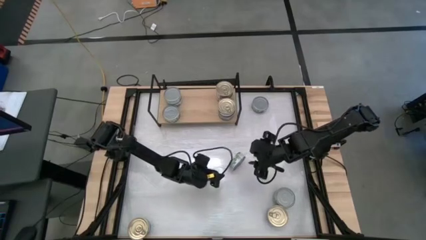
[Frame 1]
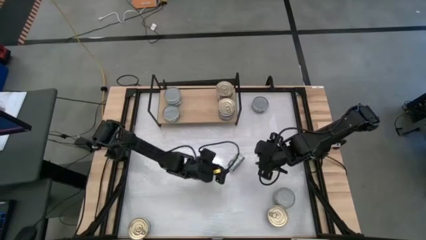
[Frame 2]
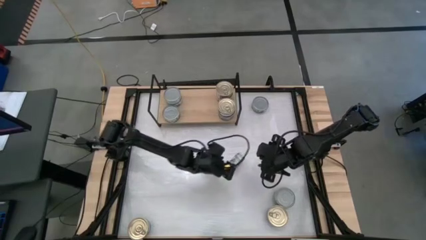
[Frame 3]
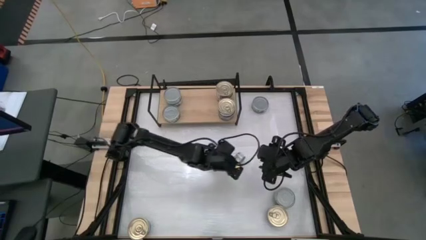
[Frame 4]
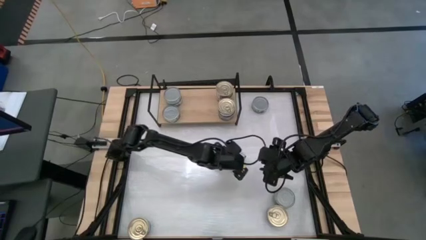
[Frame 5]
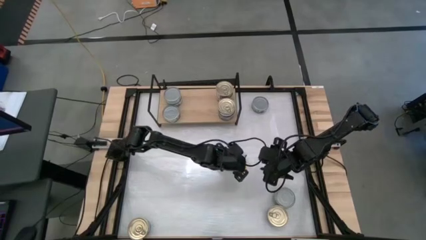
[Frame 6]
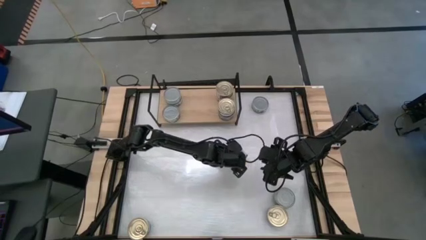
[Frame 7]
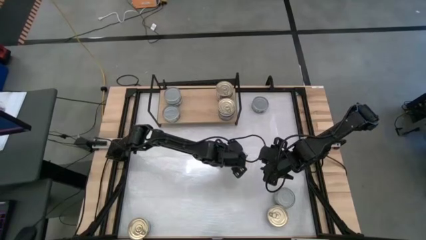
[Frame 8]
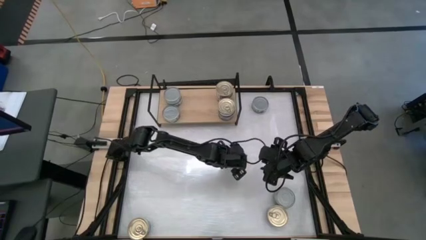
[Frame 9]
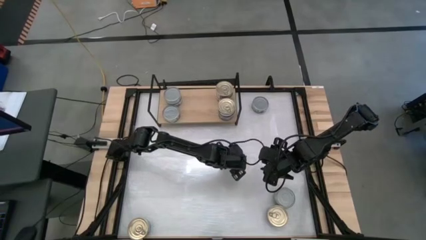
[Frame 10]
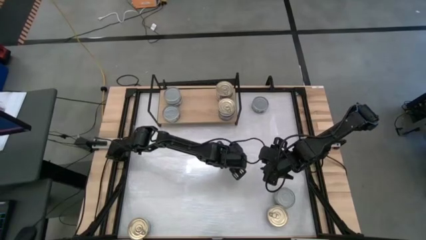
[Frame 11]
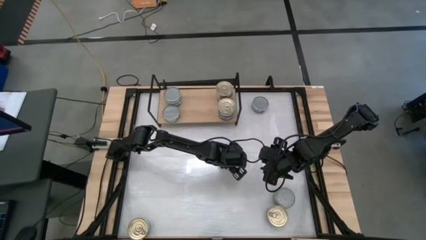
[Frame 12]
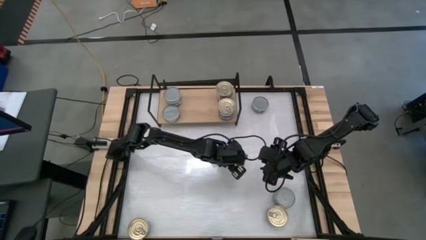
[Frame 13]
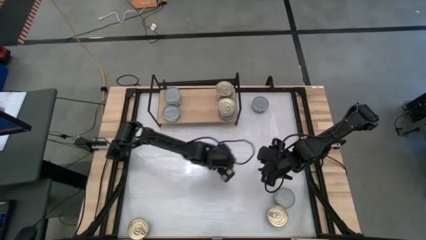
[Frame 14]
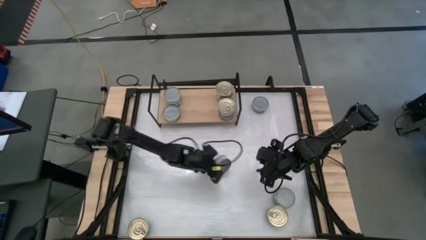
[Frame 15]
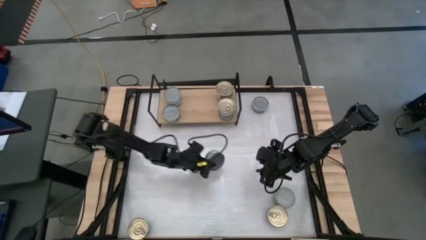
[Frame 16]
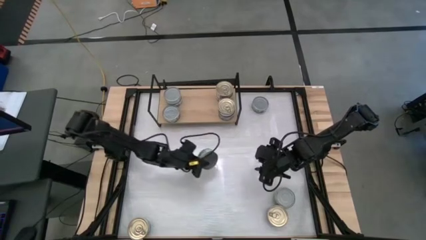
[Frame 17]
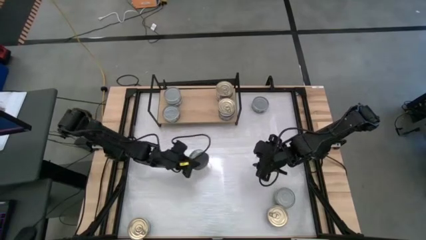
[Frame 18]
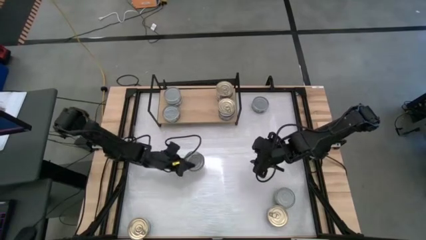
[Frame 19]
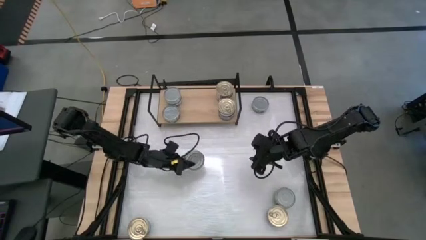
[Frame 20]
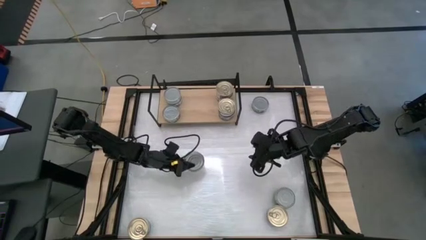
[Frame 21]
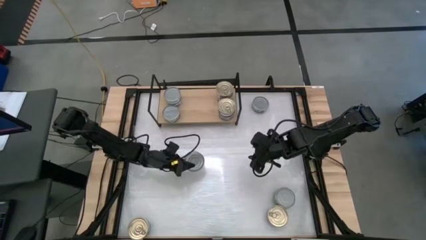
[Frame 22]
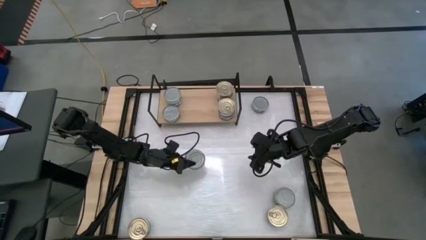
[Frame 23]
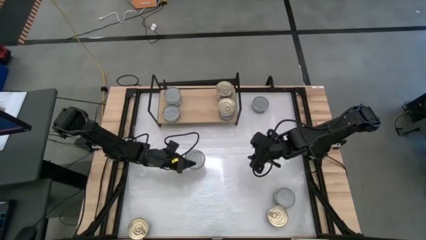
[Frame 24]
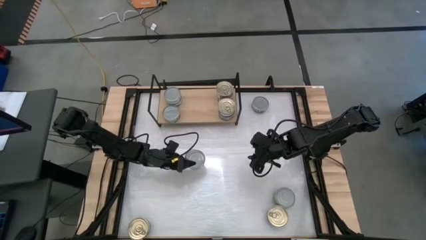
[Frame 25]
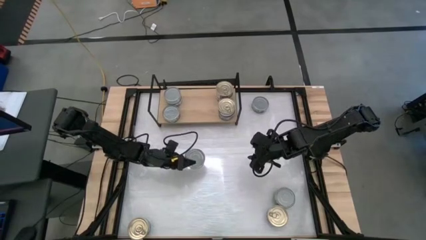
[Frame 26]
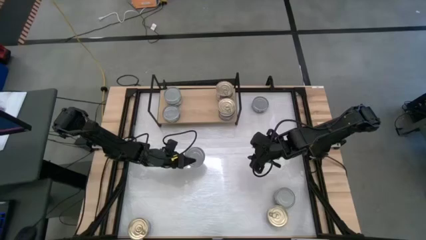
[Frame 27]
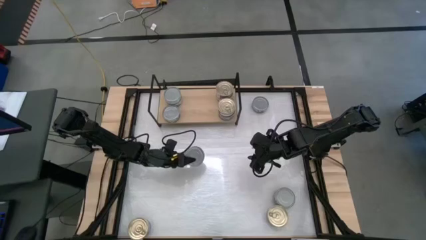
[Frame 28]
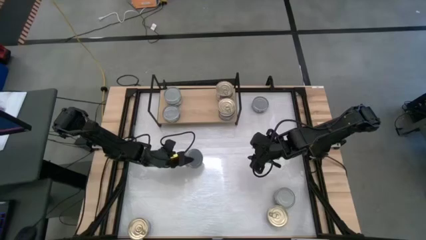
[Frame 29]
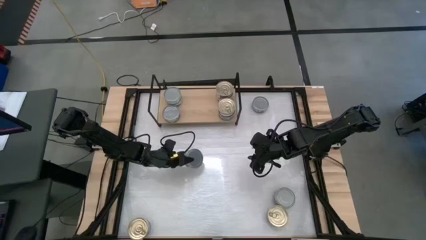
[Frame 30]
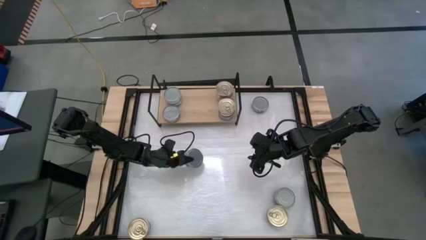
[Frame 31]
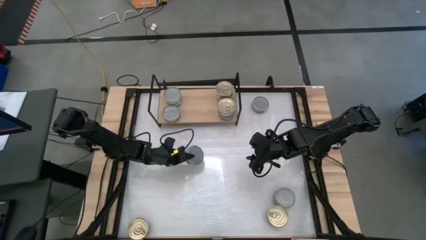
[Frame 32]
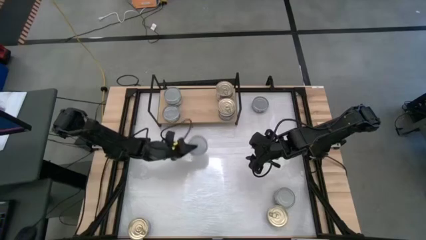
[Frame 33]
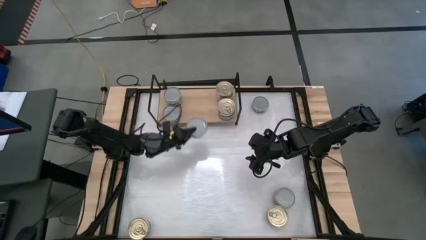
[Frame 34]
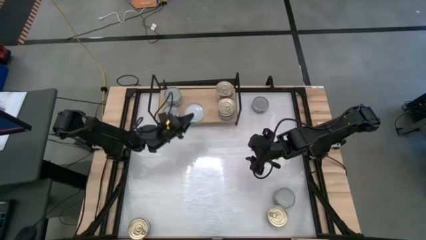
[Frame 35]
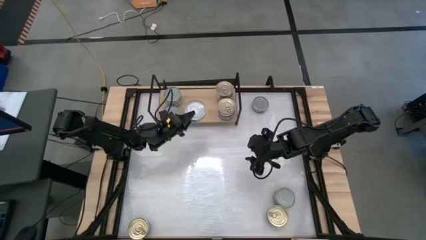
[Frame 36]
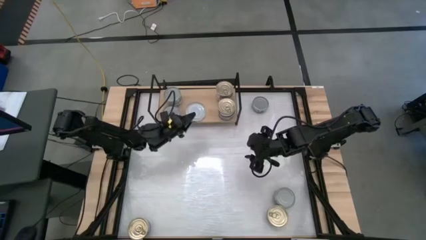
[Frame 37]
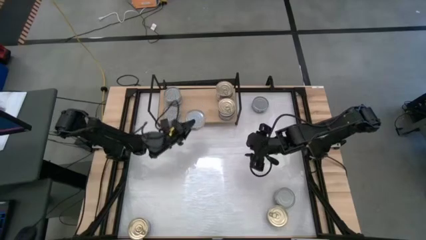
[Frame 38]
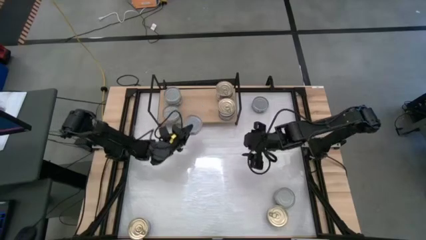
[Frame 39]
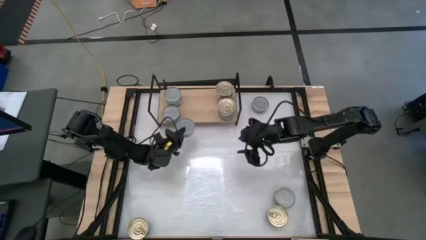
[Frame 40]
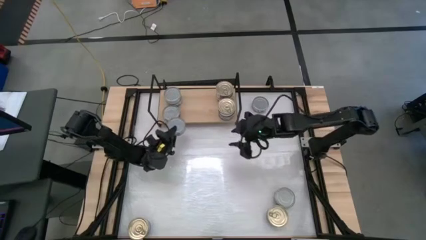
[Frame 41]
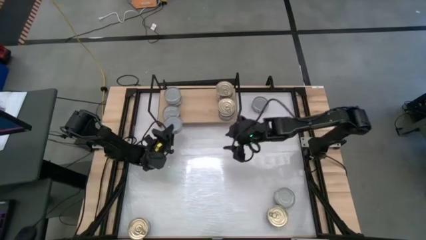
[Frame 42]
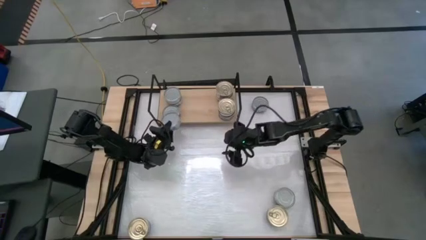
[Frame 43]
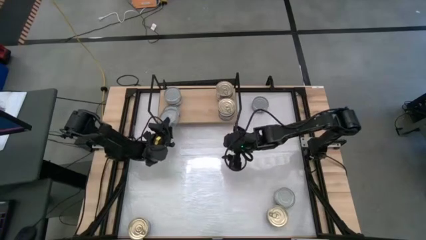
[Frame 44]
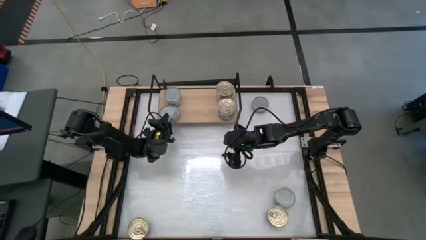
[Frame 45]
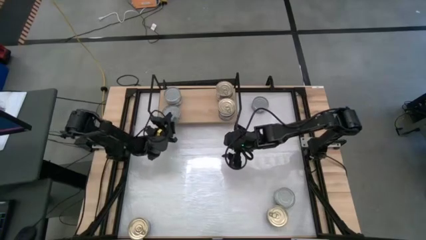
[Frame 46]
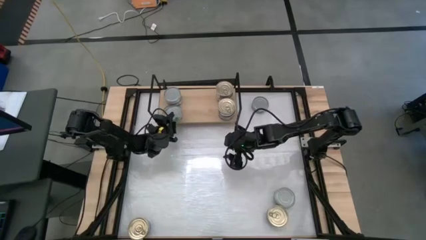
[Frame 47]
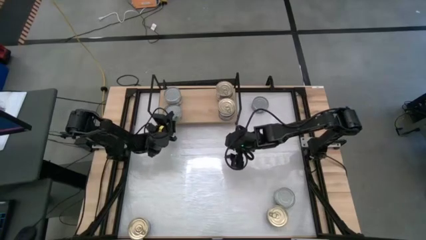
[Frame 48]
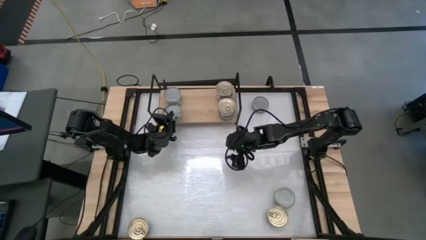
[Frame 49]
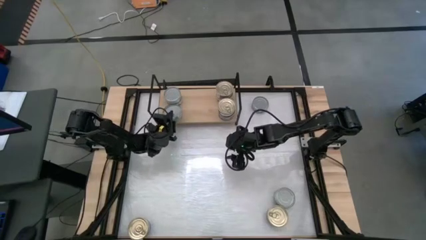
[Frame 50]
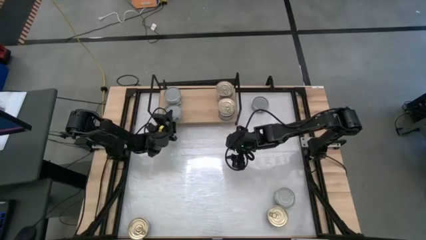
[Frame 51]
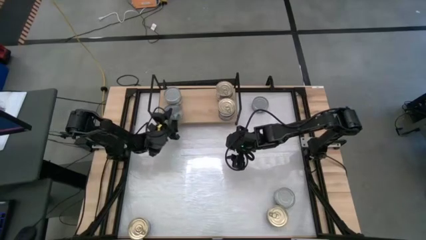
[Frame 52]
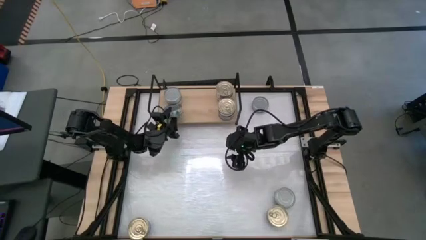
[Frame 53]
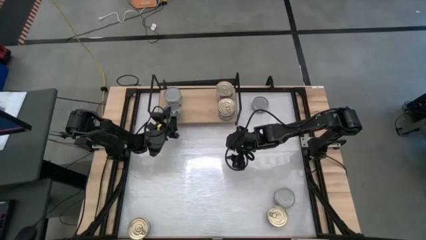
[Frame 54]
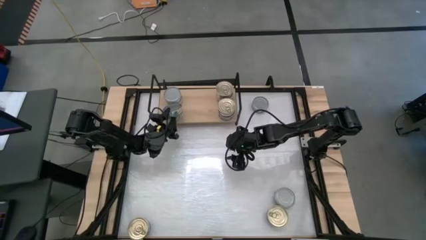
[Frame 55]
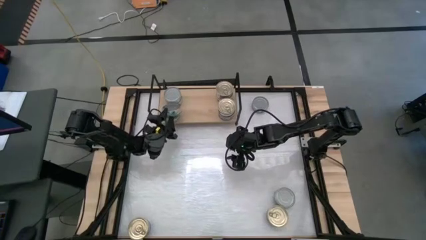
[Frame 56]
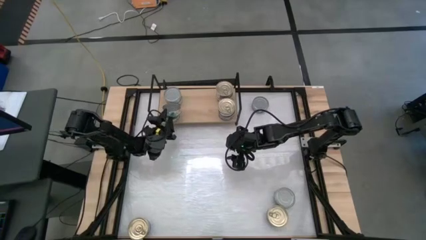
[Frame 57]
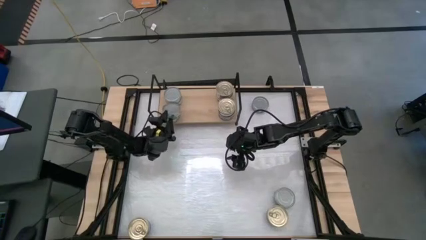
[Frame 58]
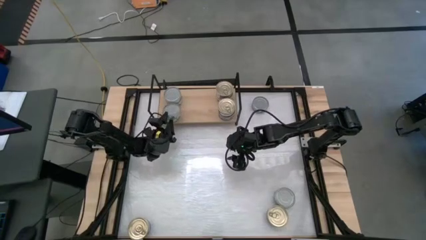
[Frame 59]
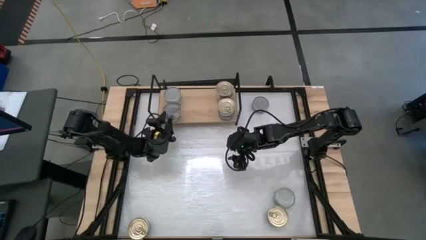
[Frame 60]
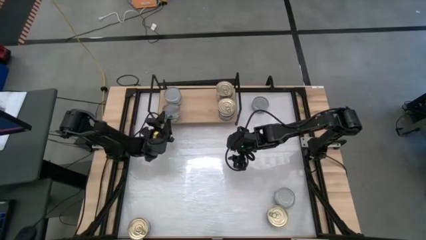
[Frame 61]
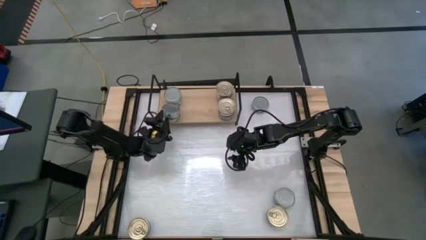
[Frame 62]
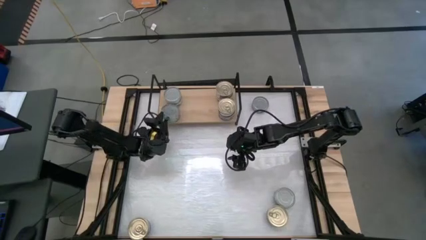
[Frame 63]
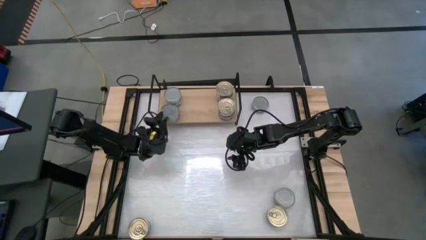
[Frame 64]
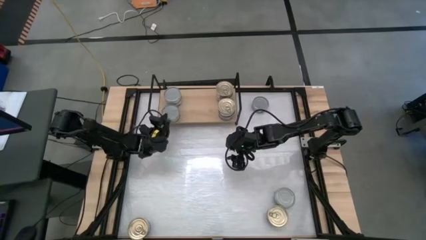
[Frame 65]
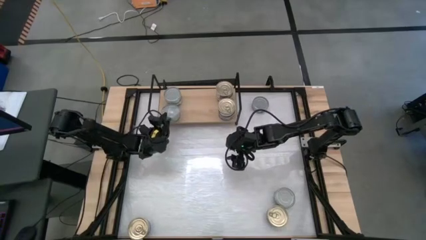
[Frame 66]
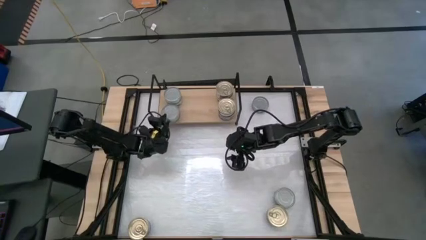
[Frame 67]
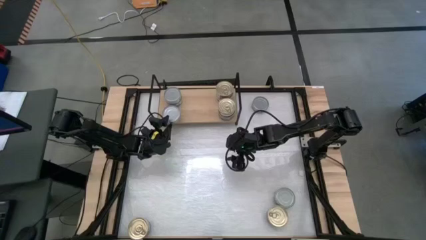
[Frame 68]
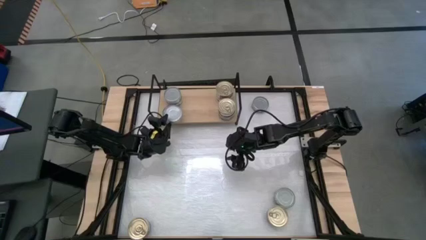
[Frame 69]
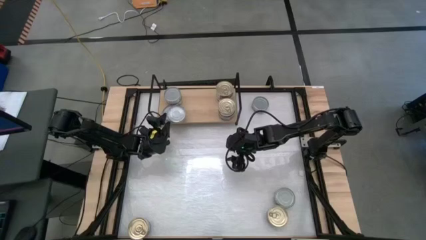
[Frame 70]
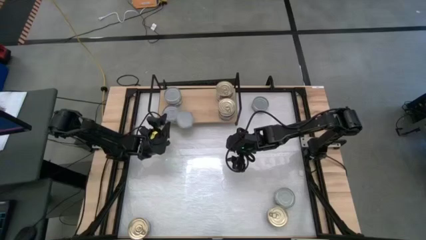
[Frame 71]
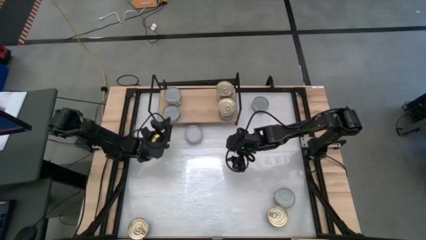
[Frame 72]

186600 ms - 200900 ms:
Task: Stack canned seafood by type on shelf
Stack the green tuna can on top of the green tuna can on the shelf

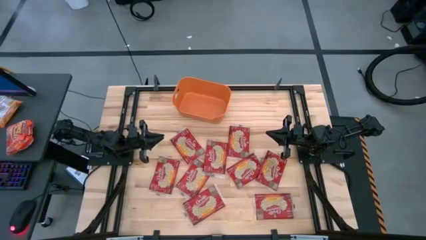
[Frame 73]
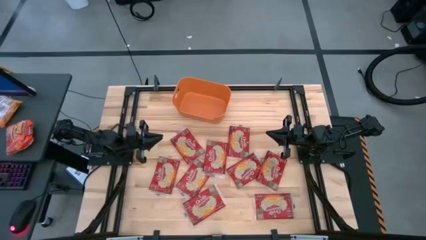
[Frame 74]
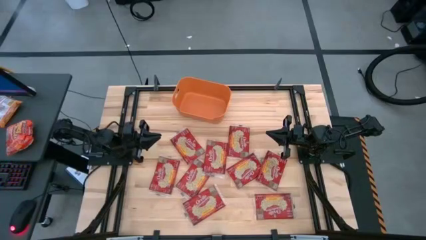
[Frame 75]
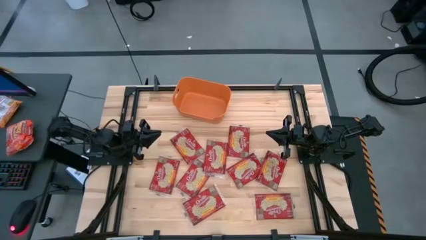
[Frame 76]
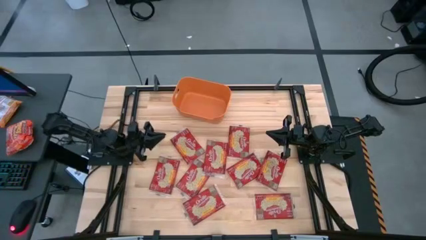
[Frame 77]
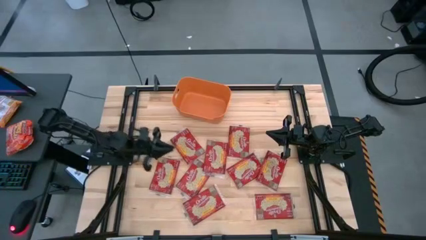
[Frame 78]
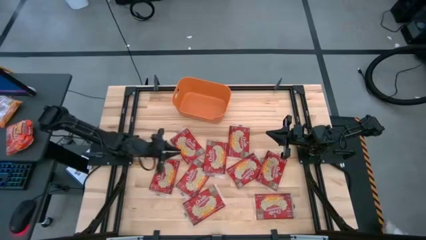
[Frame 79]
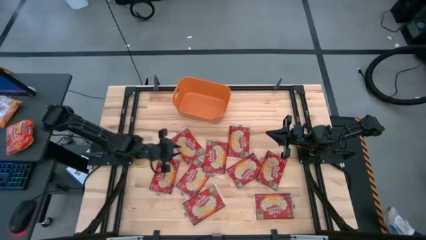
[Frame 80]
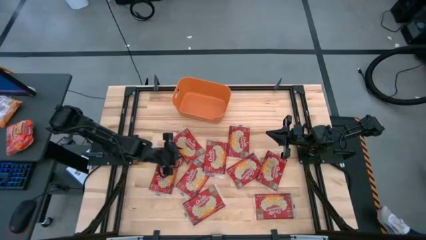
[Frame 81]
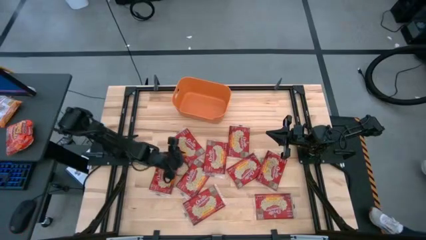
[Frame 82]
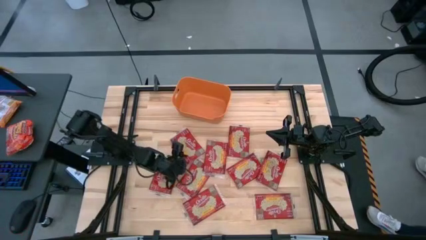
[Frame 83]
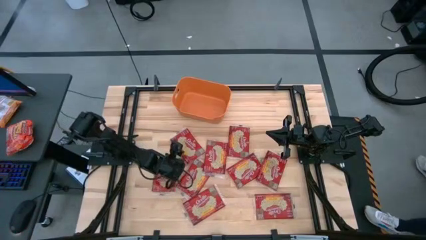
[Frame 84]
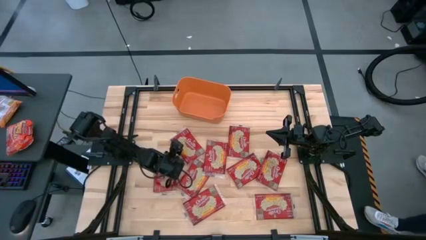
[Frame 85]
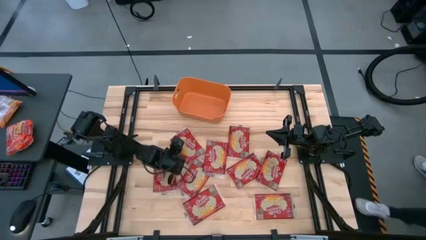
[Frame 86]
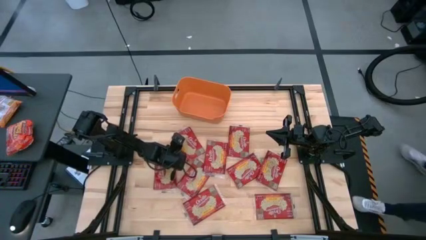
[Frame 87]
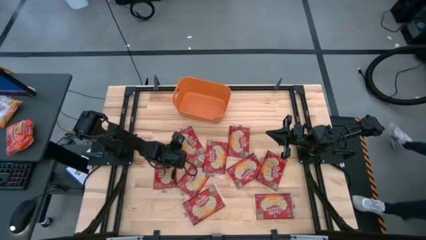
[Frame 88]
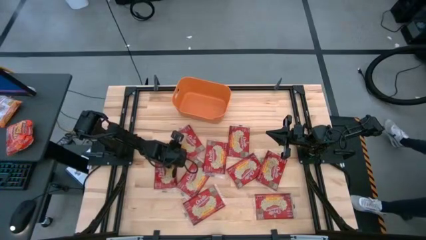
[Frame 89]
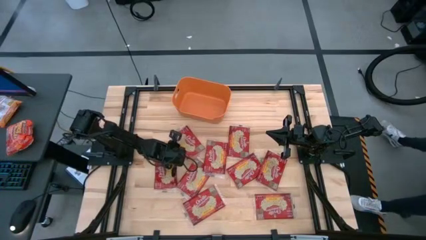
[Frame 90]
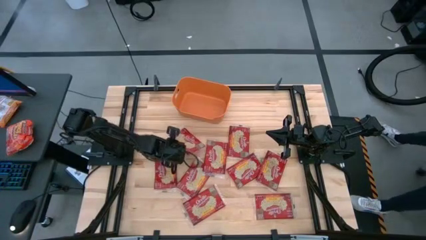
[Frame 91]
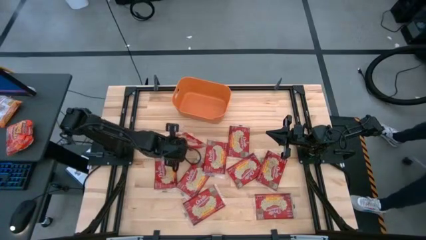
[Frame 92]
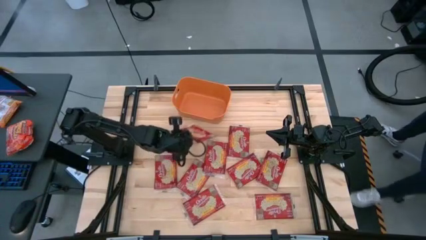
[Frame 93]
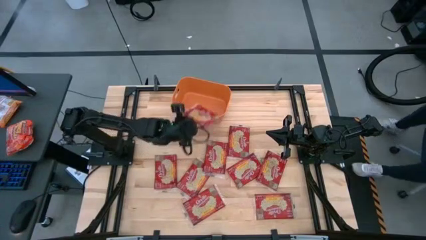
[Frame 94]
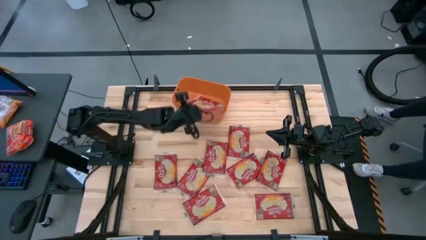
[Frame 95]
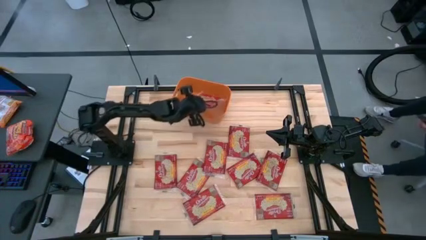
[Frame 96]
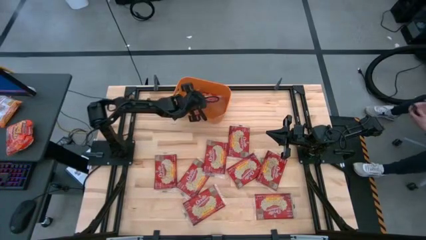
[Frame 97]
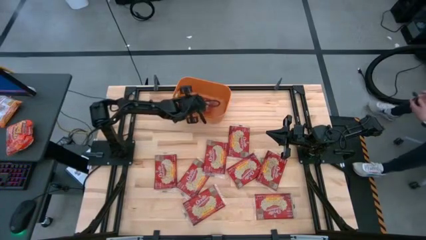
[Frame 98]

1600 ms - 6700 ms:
Task: Sort popcorn bags into baskets
Put the red popcorn bag into the orange bin
